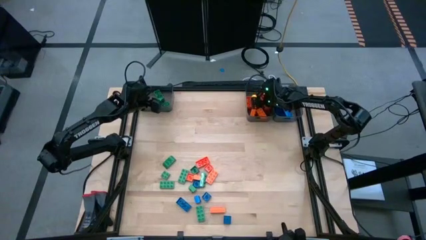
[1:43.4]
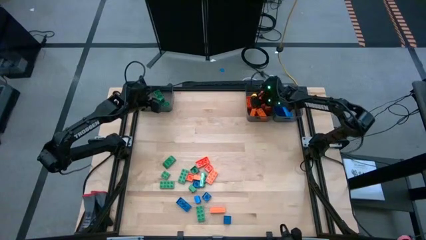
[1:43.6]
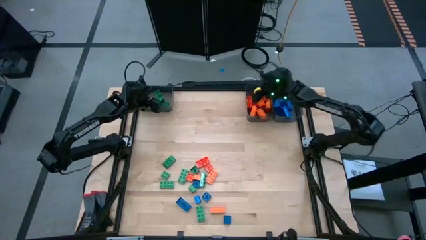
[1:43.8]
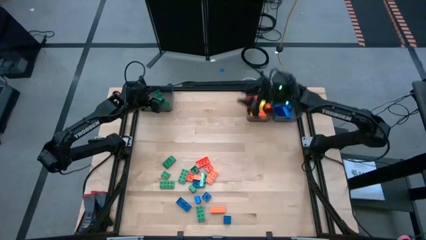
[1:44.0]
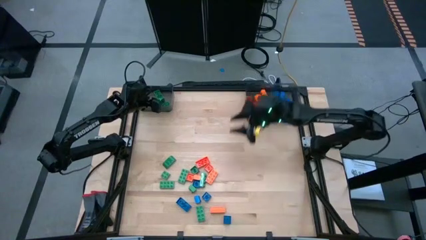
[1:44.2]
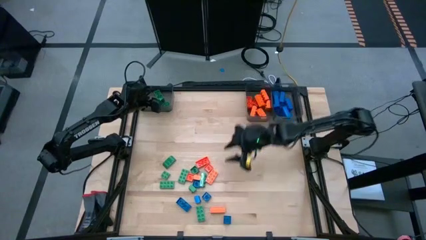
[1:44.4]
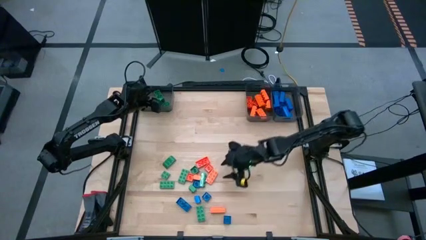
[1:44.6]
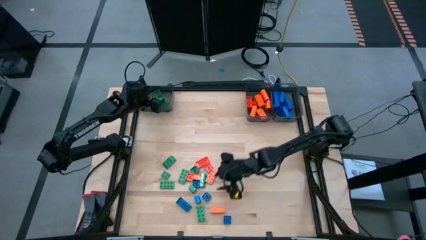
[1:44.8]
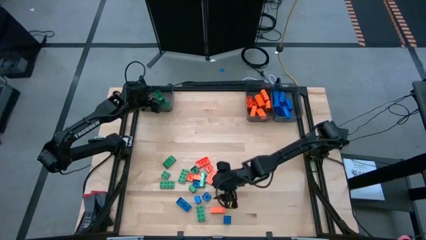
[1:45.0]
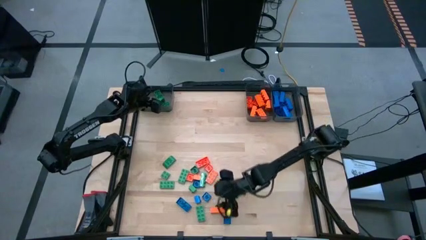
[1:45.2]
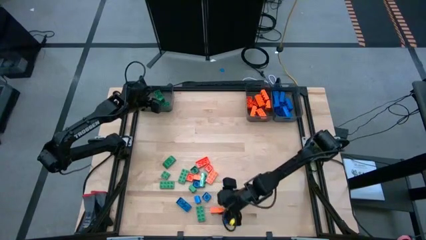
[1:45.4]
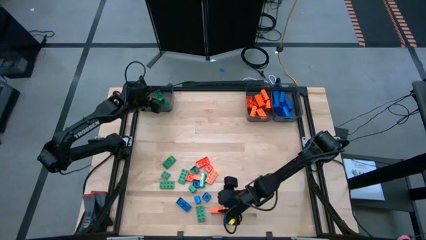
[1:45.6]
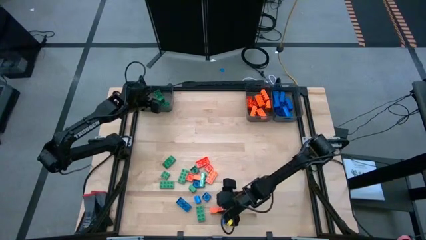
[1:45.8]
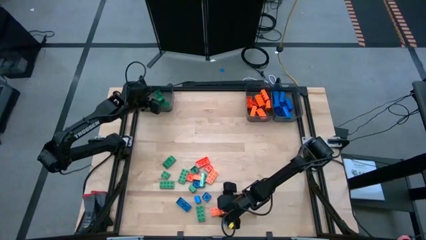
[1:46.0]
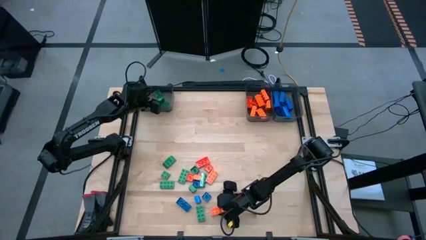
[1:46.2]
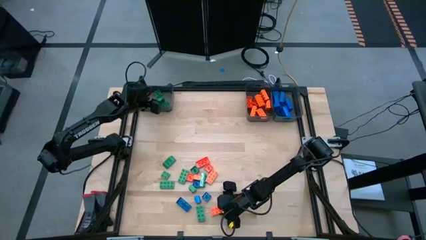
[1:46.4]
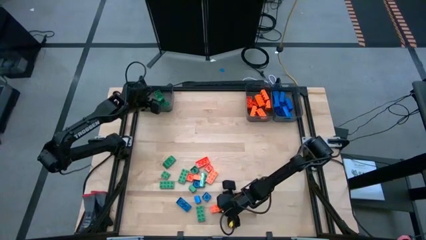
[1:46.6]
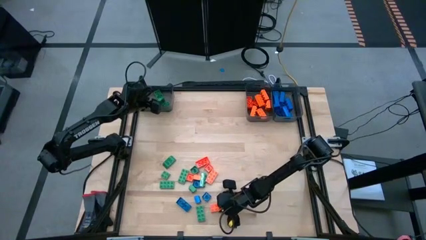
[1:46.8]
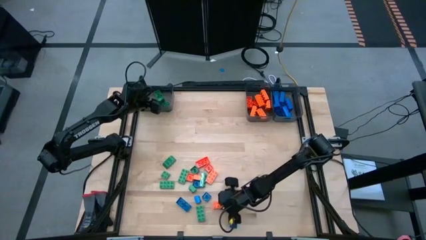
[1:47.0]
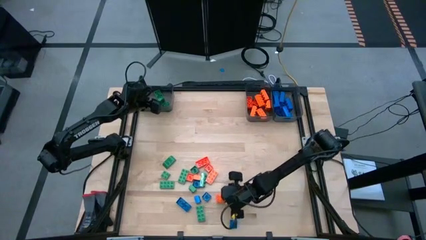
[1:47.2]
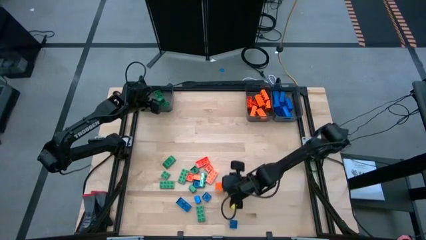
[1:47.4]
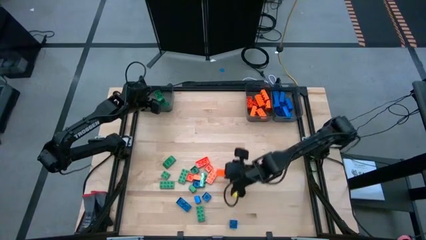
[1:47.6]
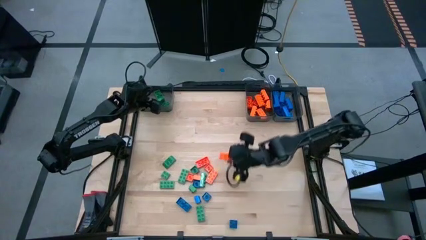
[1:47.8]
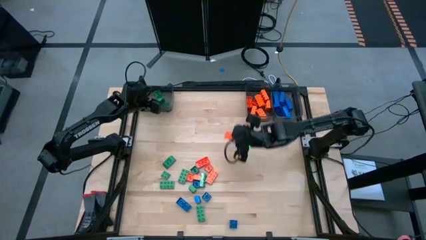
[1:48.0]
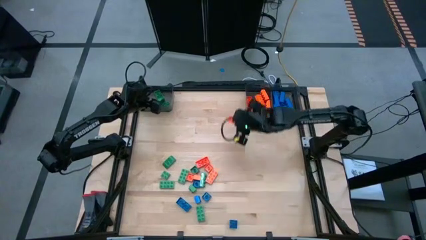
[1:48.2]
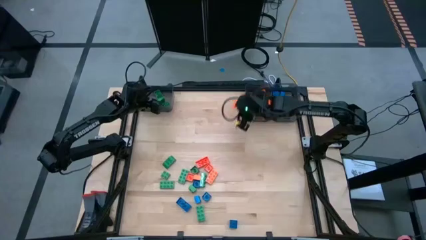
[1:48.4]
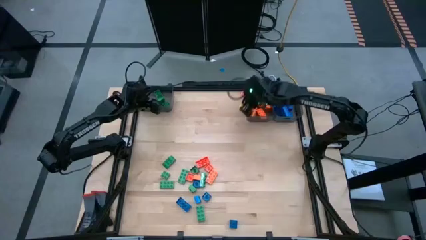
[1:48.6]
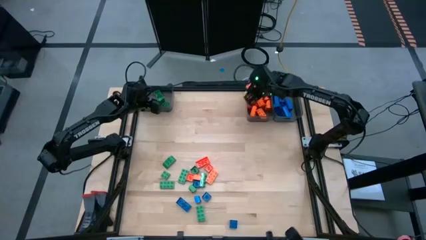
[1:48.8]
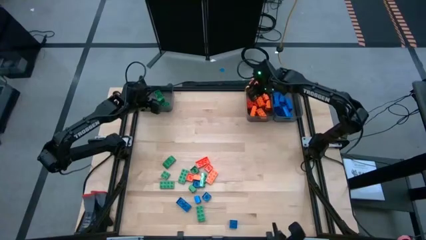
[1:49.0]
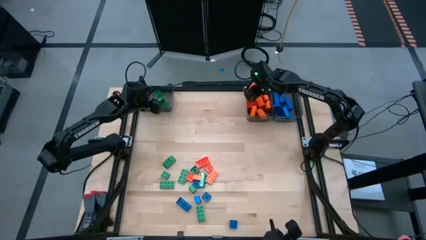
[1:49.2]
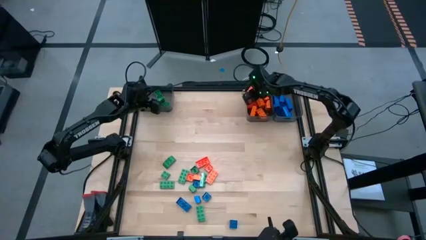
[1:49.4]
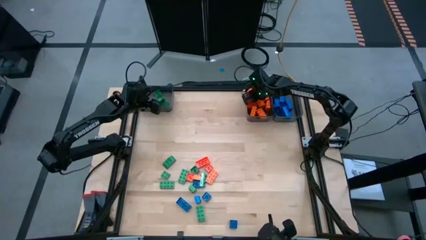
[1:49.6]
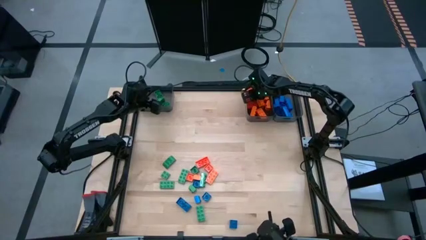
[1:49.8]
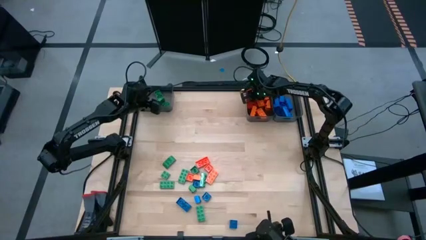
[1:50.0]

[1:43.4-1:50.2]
Task: Sort blocks
Put the orange game piece into the middle black bin

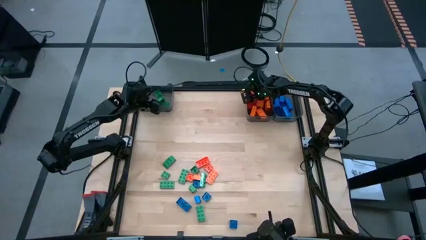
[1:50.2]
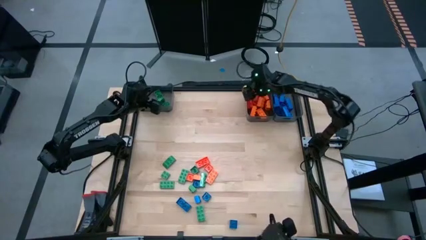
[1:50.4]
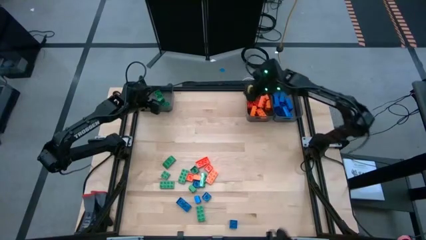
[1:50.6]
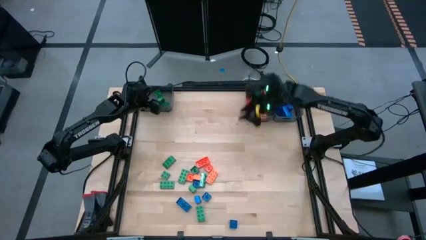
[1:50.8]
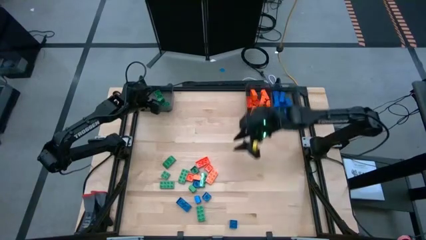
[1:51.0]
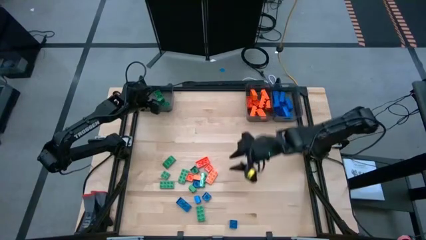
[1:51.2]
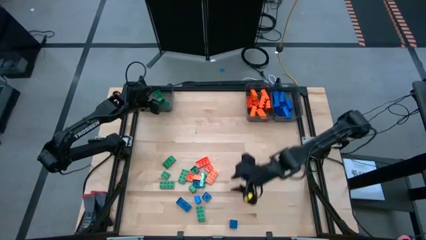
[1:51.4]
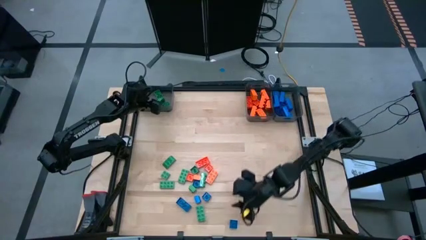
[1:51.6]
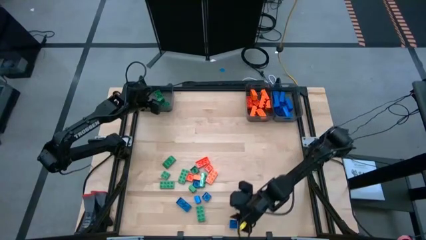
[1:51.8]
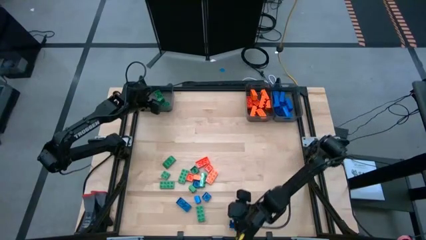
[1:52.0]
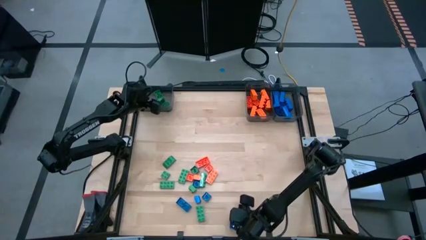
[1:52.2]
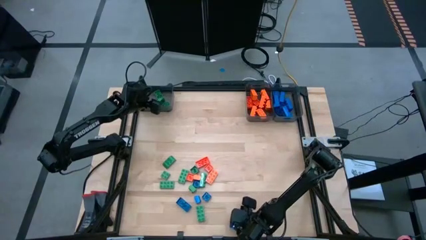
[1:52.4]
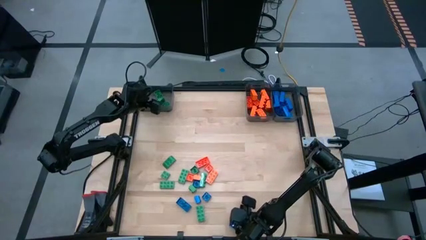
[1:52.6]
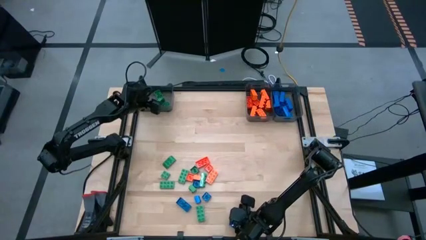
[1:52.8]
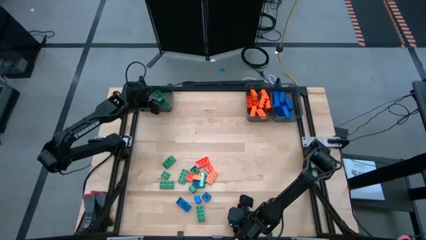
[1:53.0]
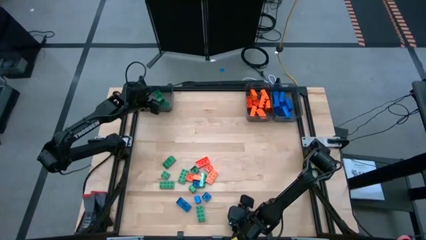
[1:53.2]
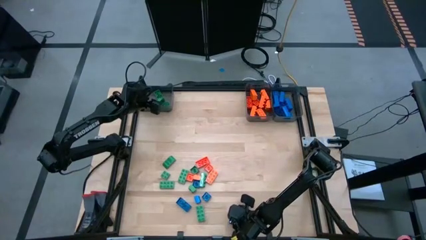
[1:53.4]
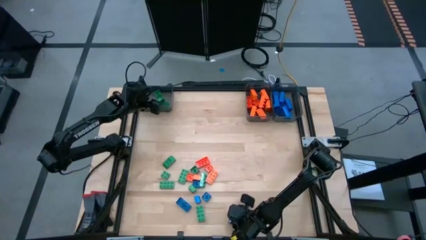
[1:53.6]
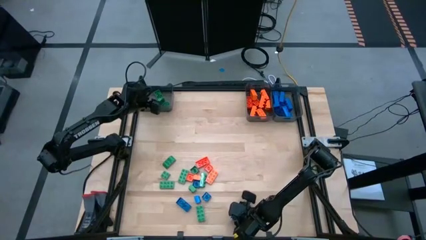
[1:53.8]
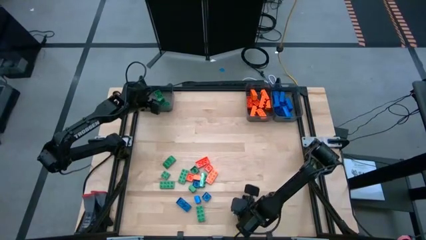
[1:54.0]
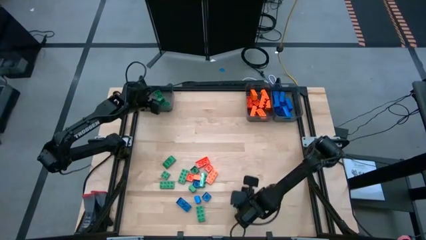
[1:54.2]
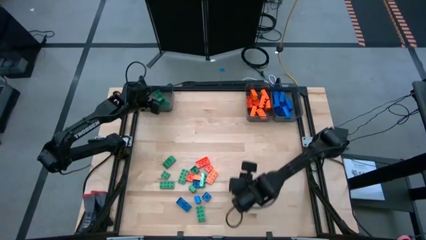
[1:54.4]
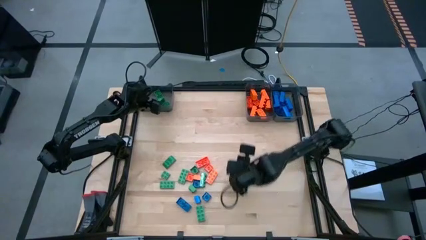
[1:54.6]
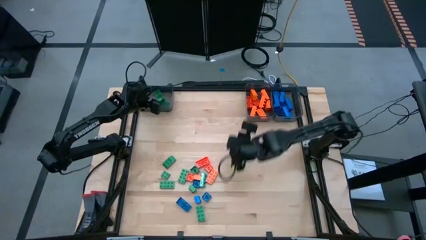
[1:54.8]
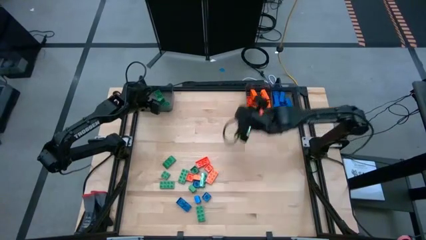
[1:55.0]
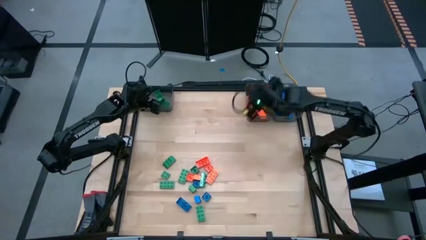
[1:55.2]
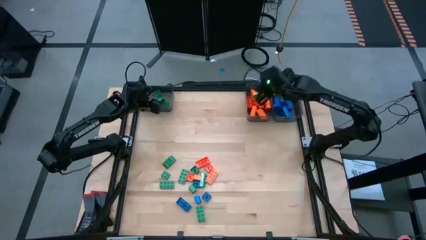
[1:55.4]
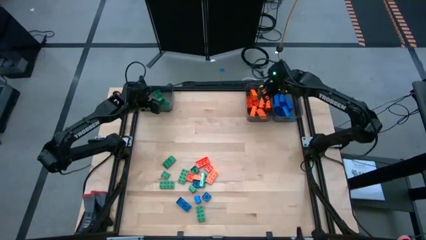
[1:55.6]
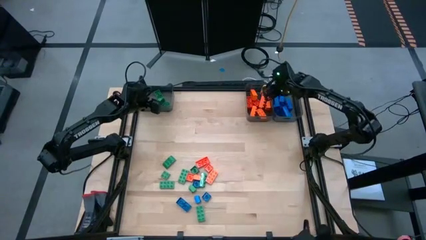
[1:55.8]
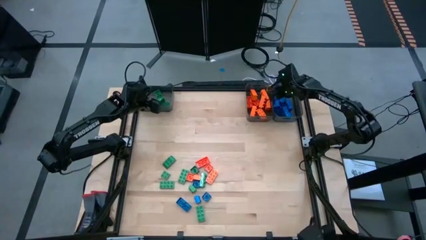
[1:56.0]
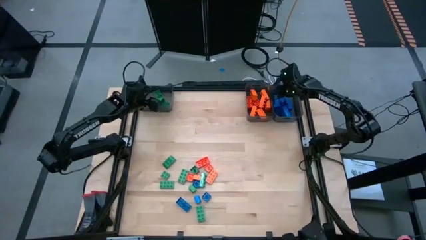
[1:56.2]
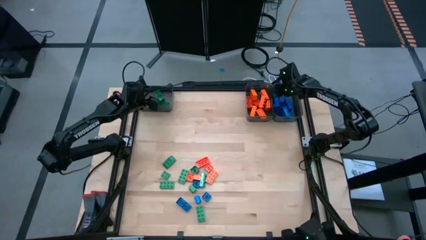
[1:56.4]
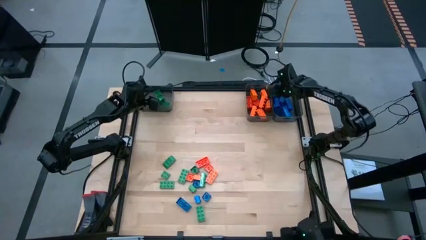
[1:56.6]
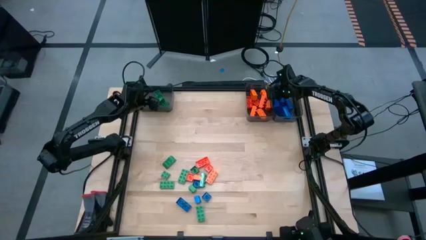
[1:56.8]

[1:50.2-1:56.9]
Put the blue game piece into the right black bin
